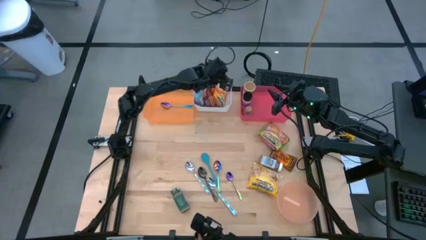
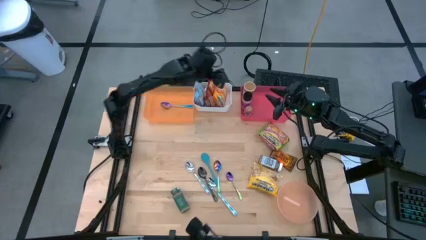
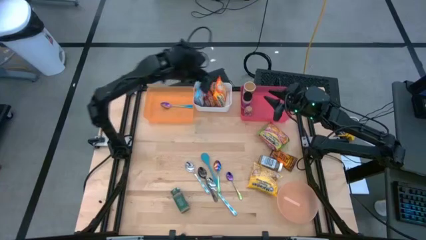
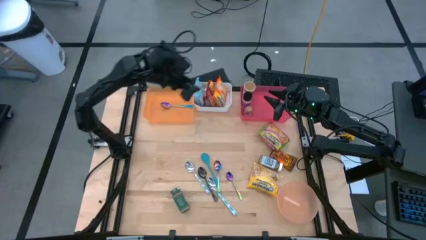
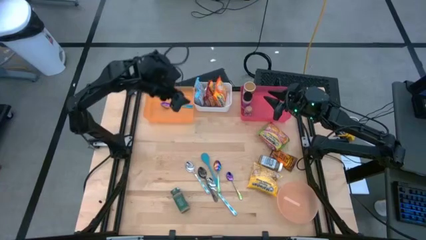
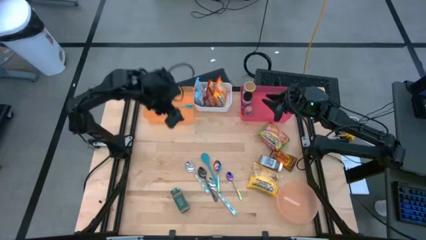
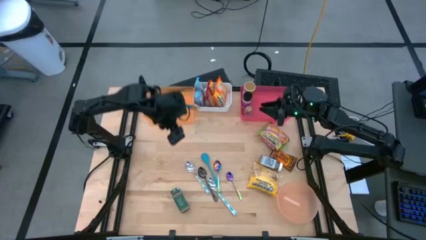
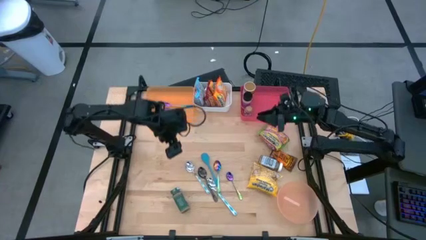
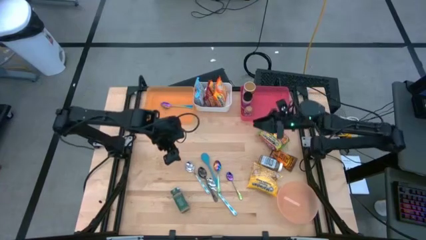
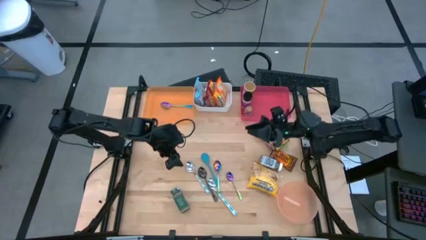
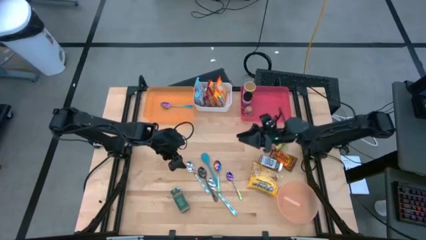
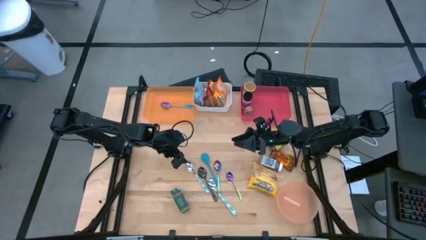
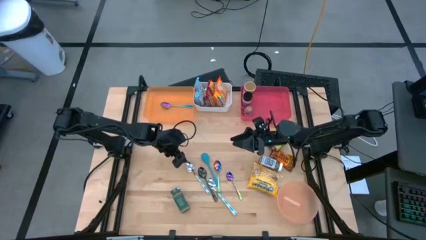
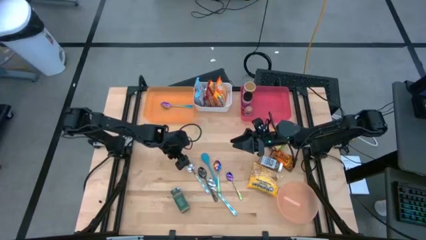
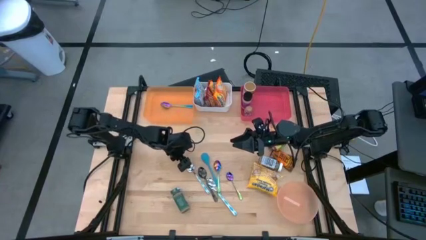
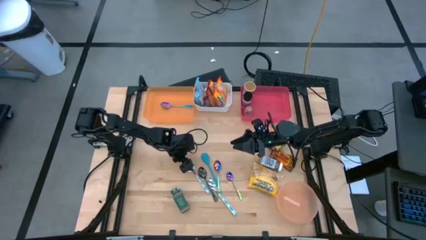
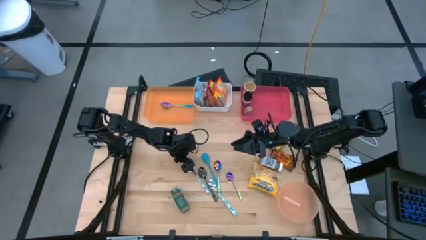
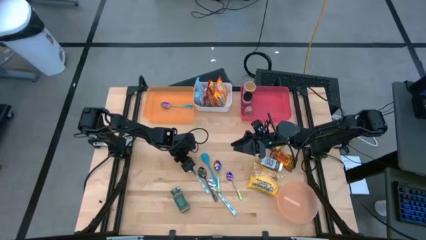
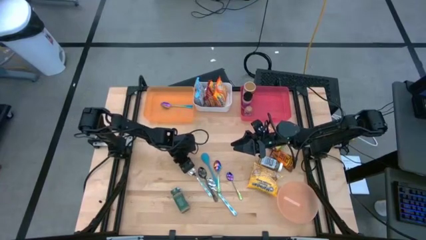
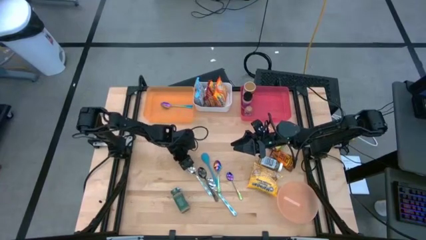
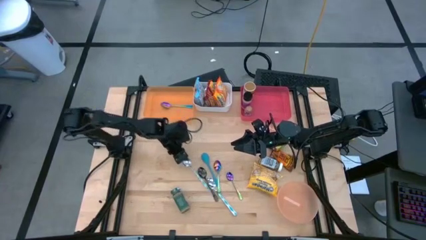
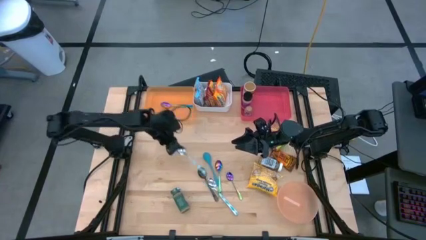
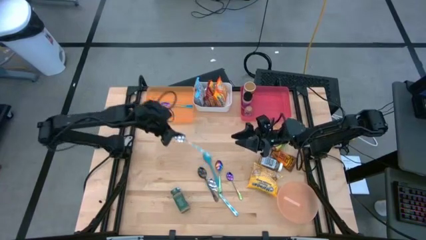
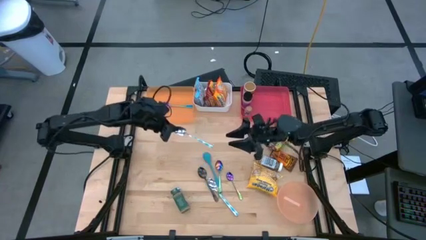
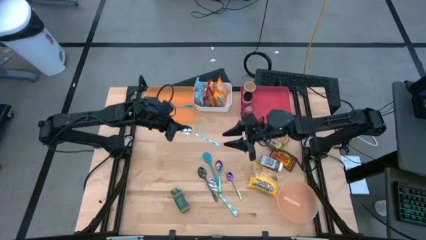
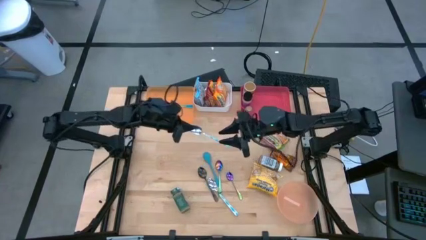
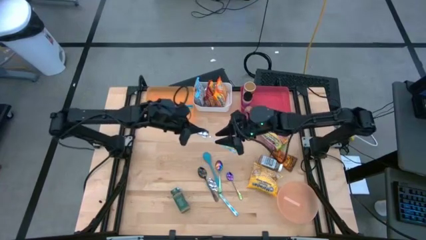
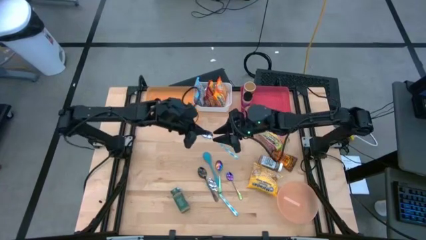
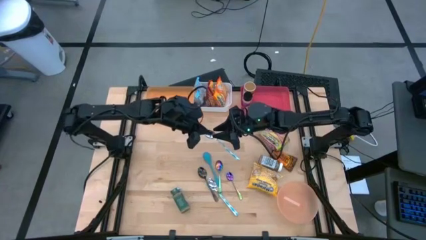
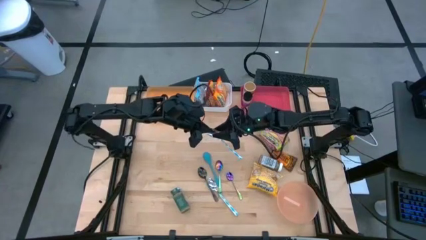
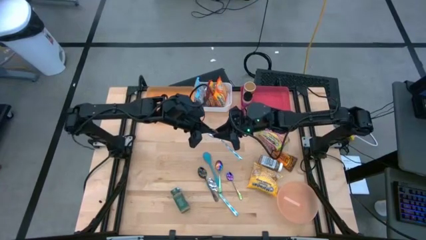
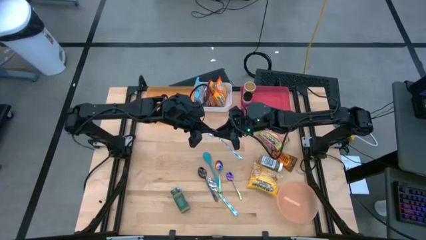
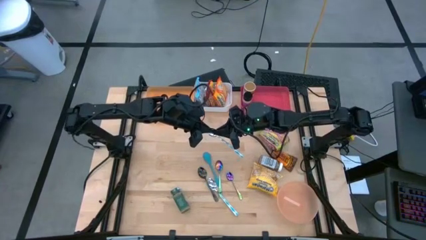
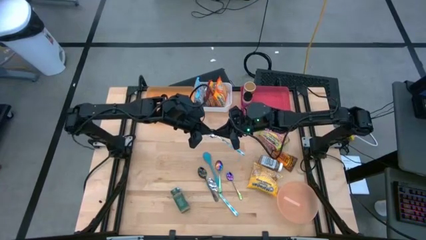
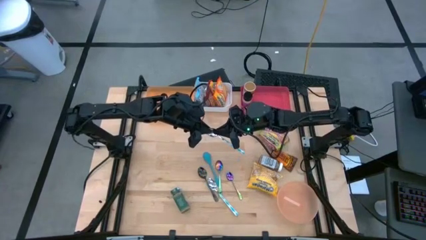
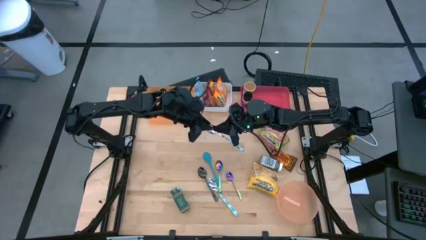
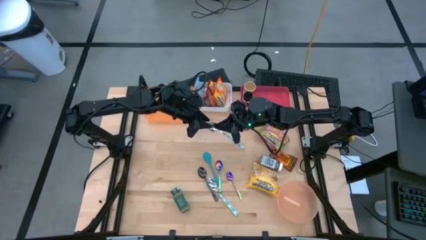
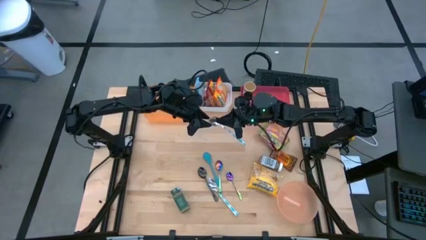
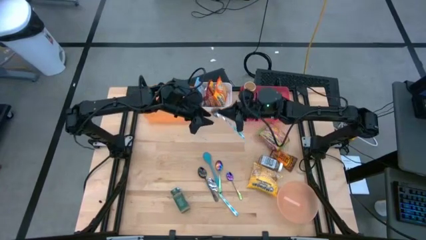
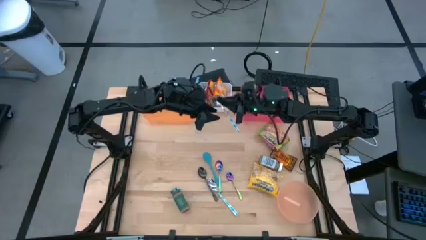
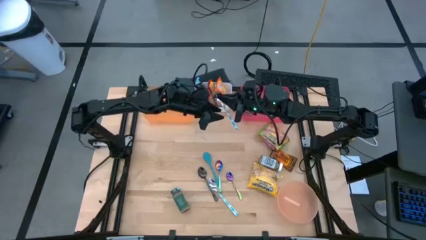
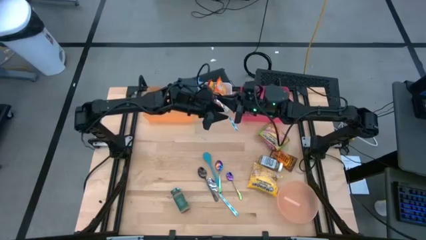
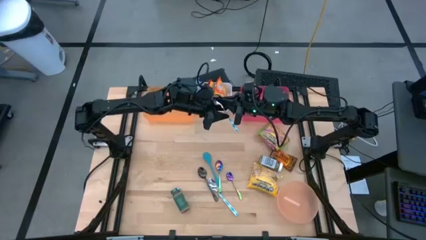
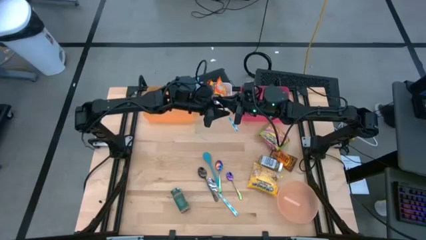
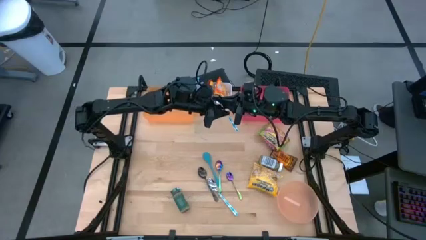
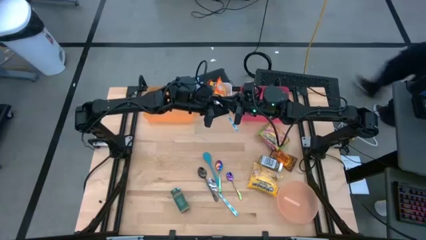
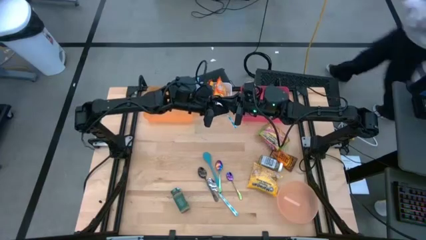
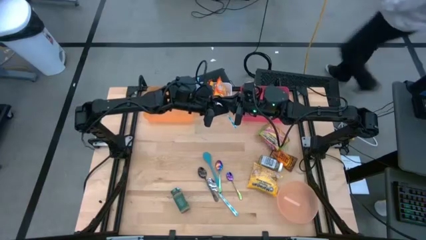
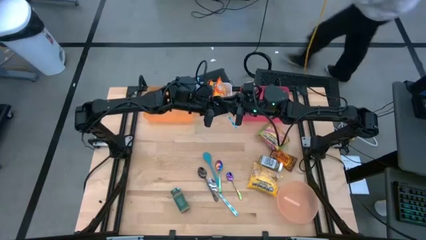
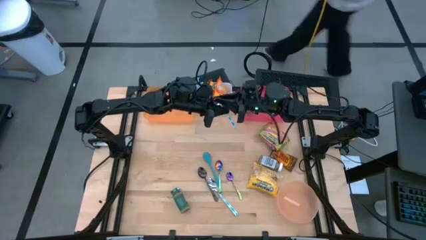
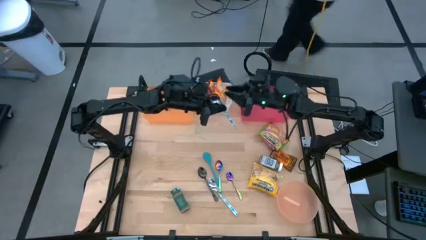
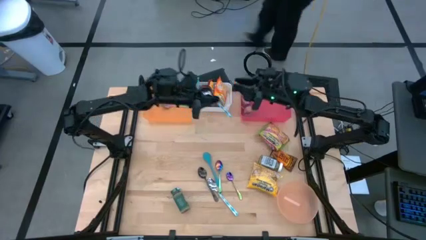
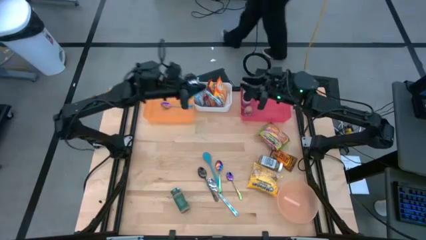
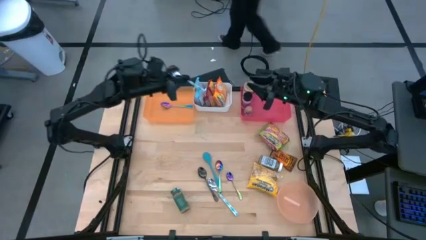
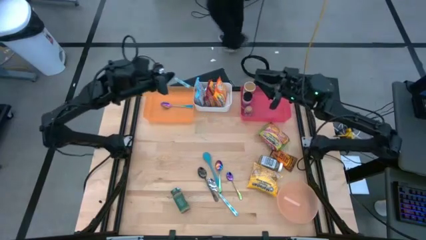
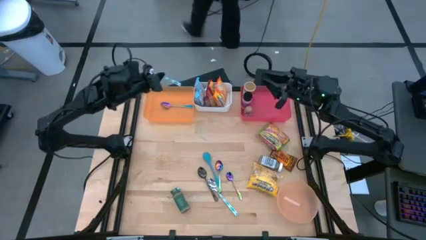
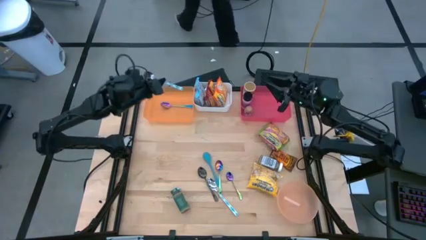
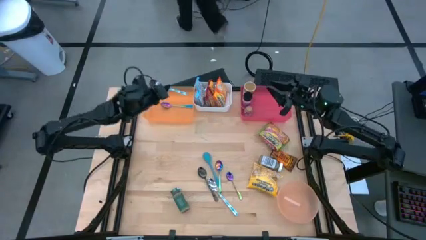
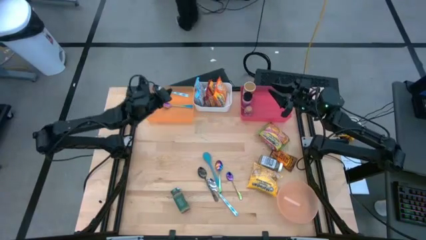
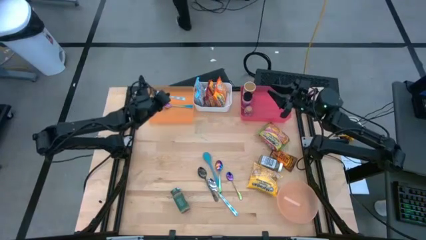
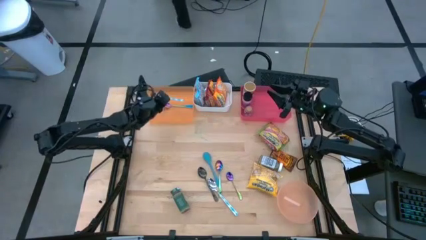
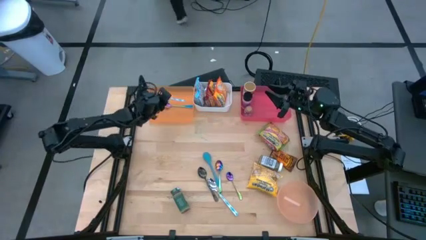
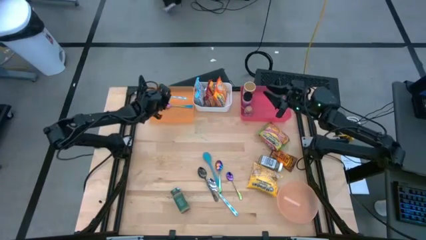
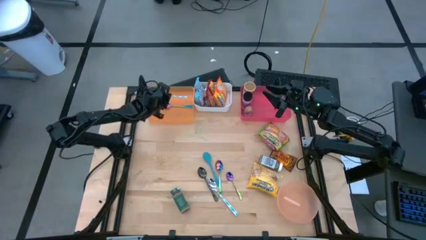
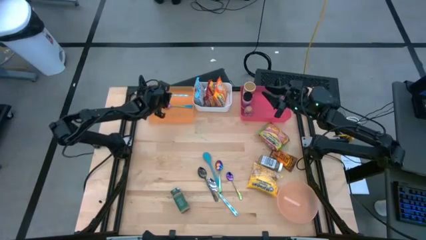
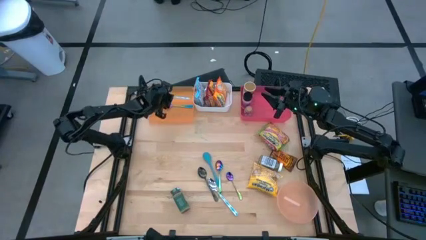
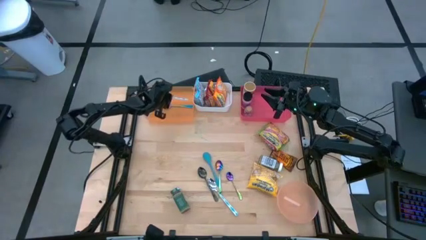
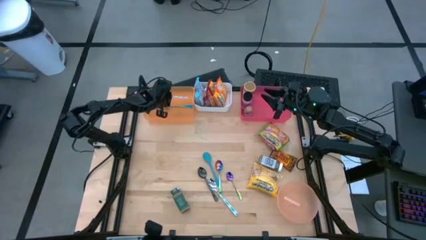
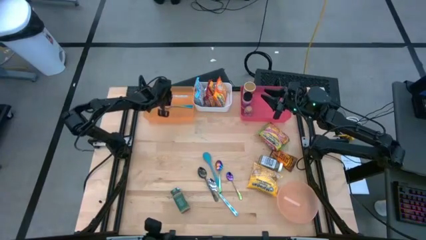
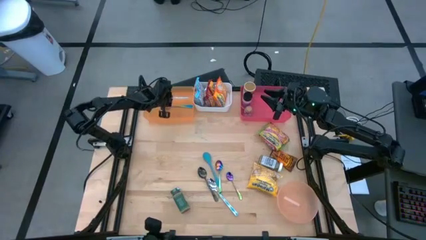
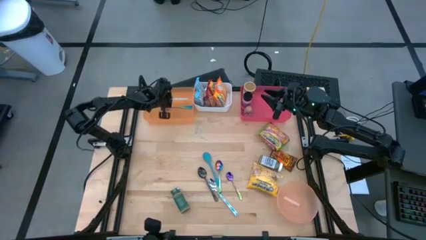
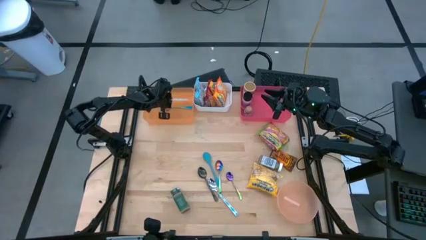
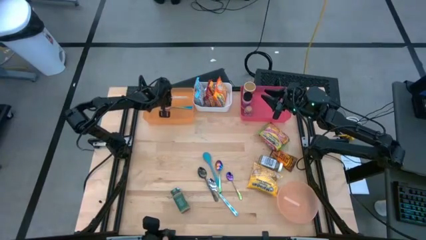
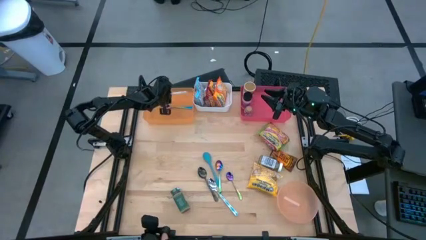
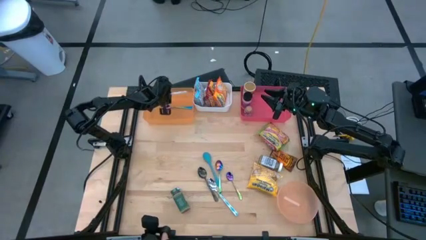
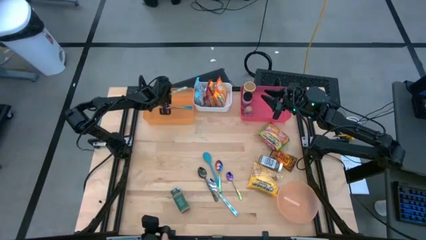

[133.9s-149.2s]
Task: Pick & Place Food Item
Put the left blue spoon into the orange bin
